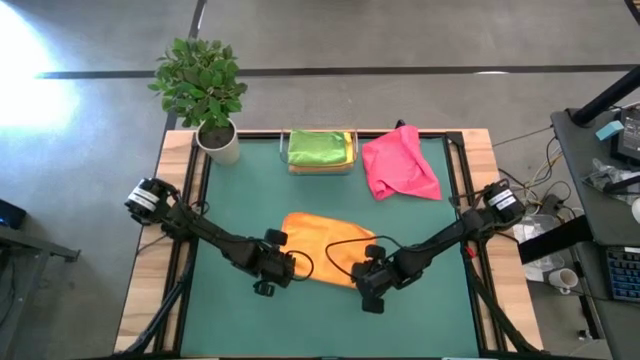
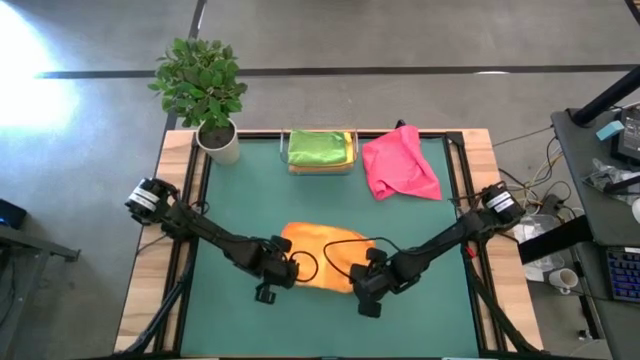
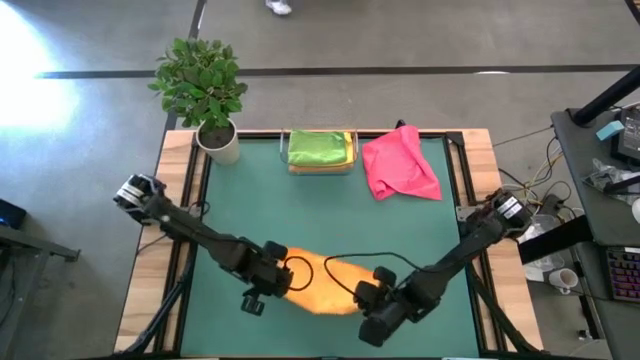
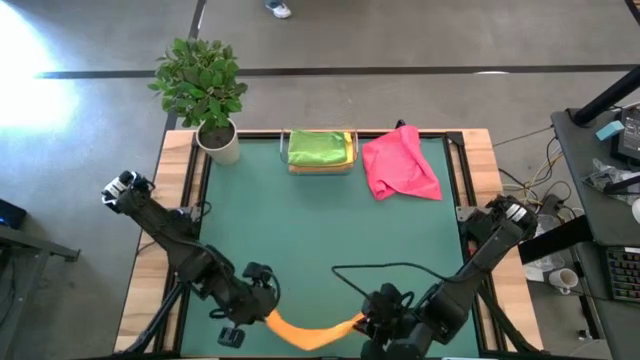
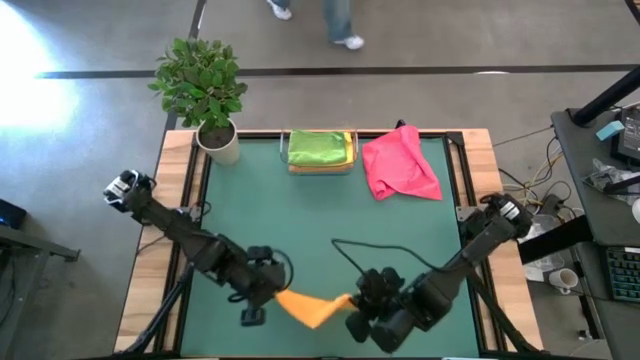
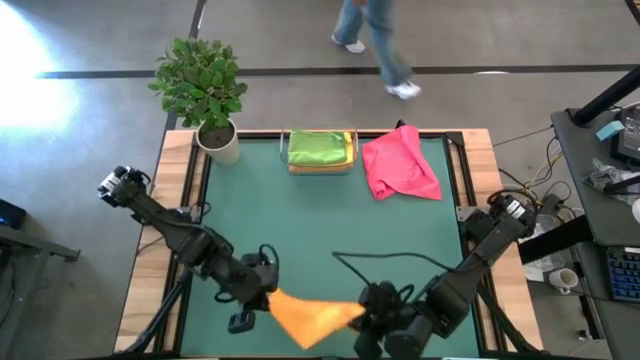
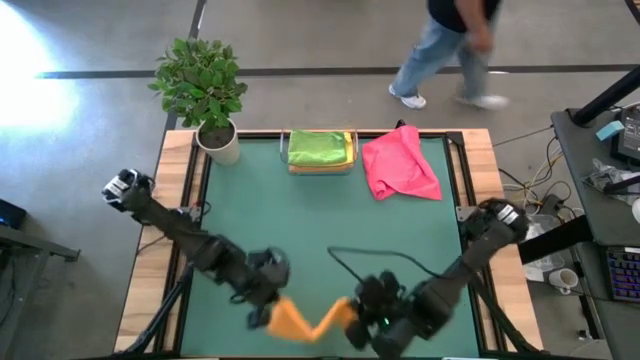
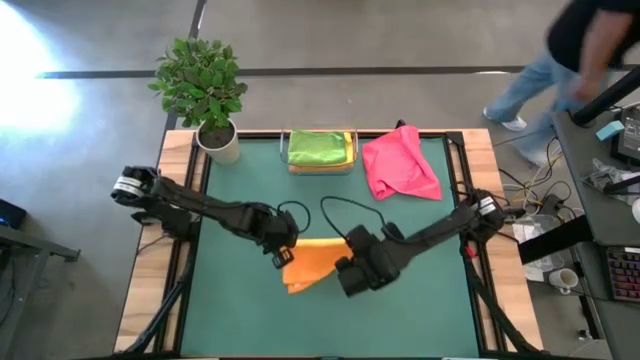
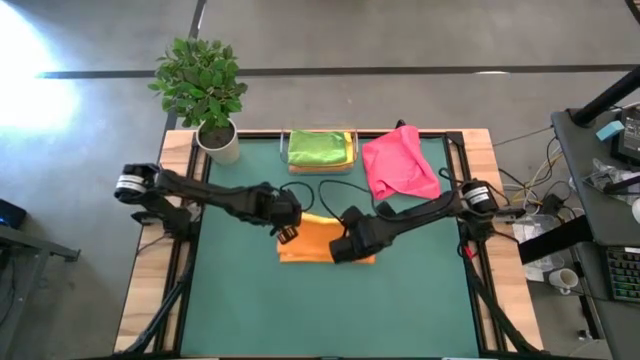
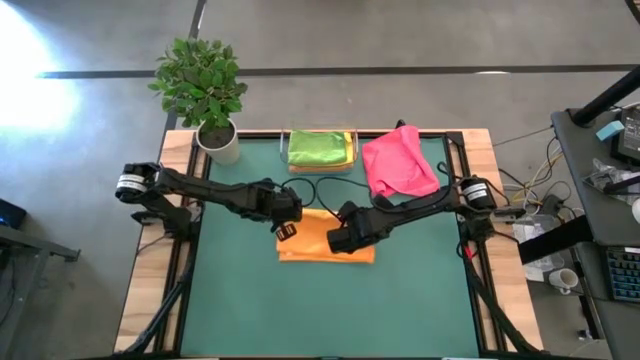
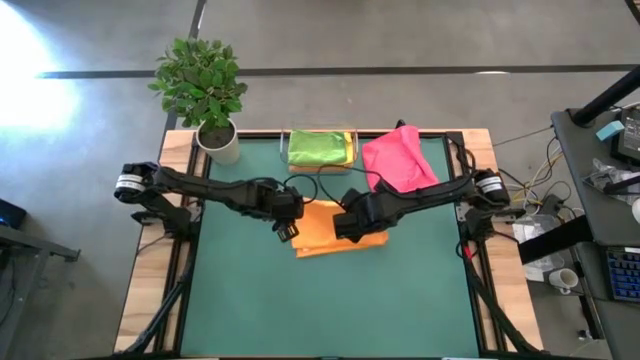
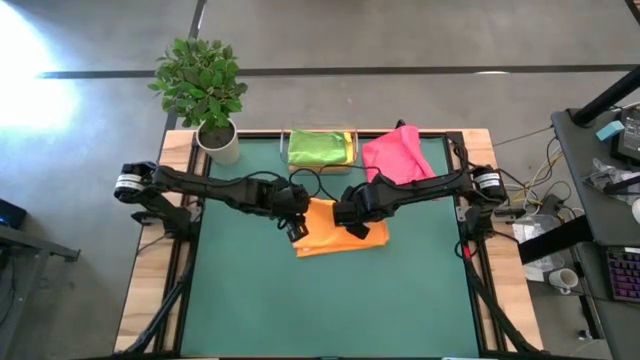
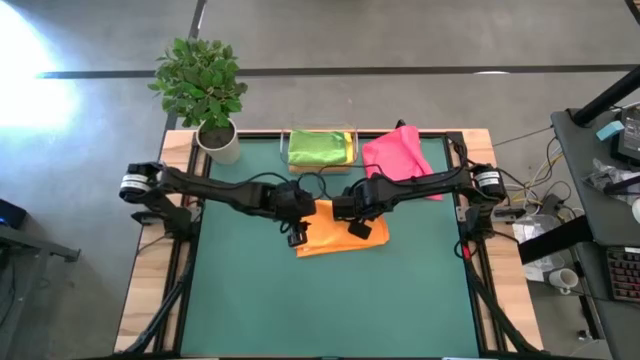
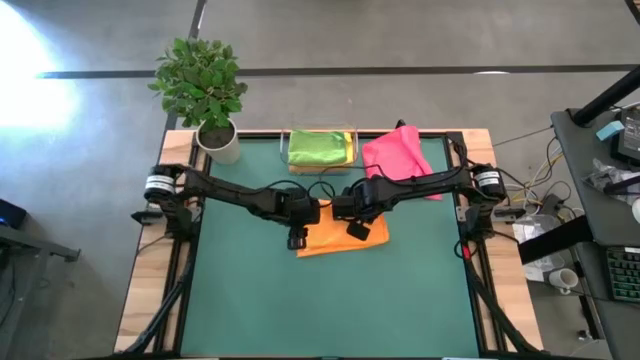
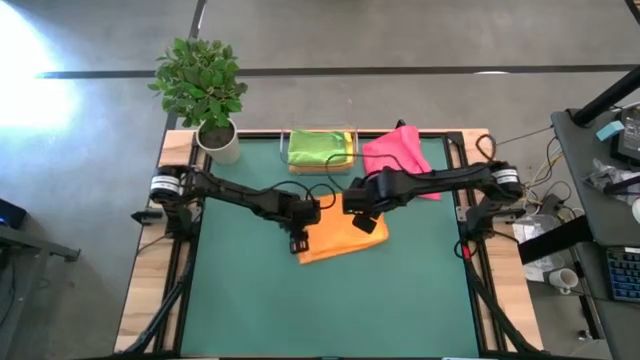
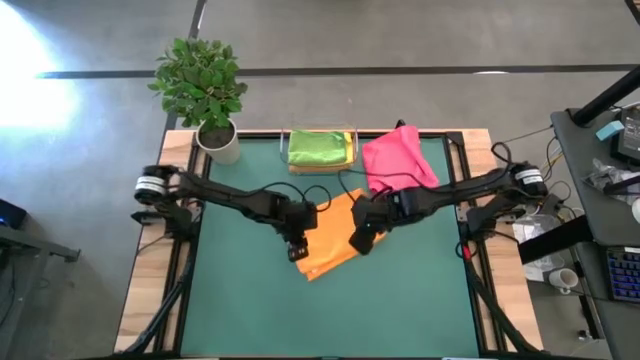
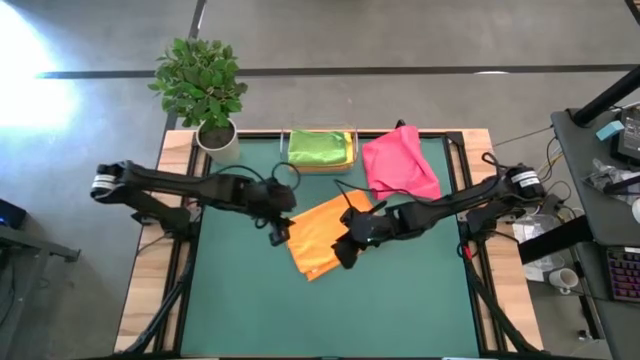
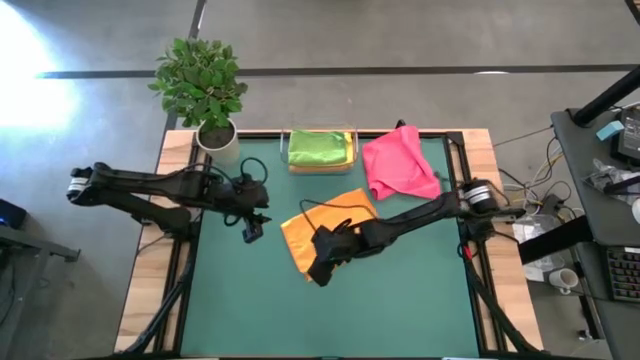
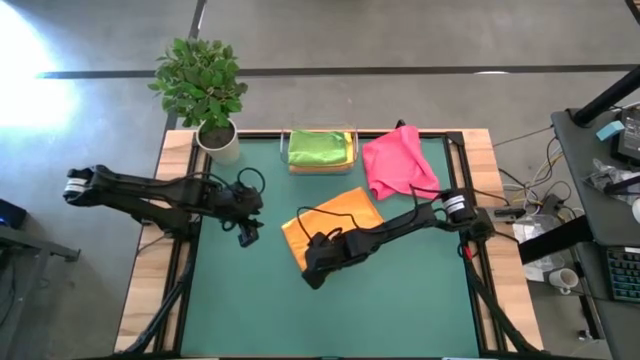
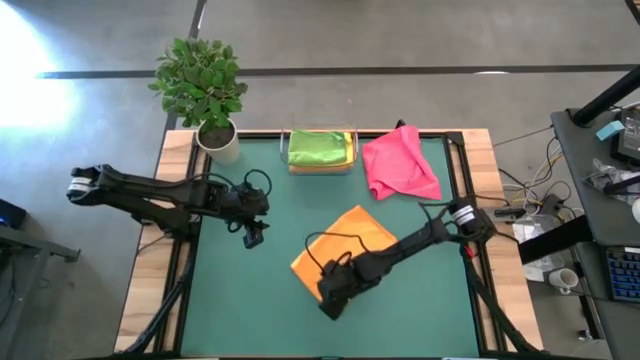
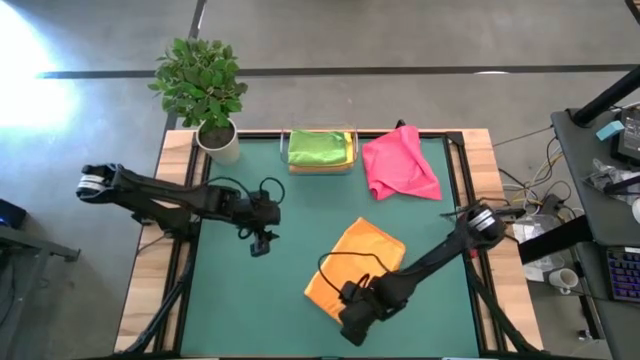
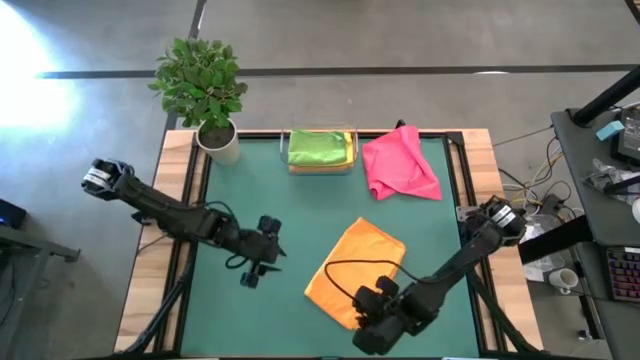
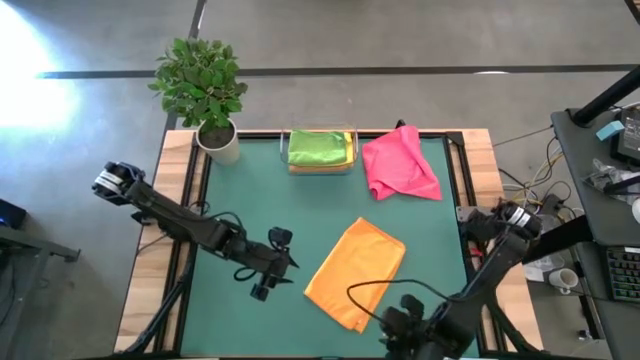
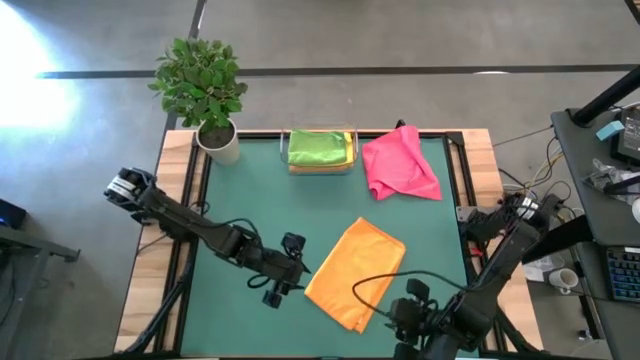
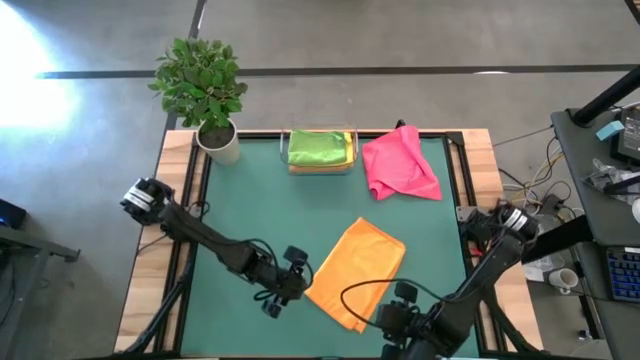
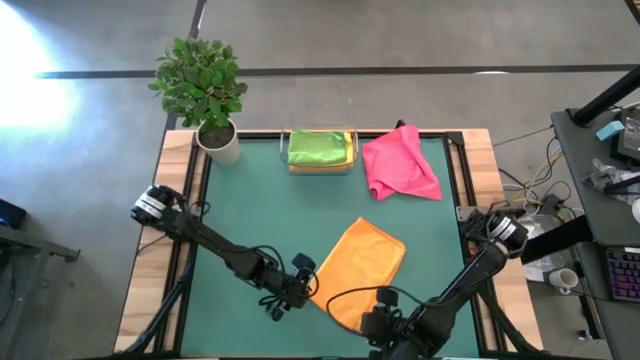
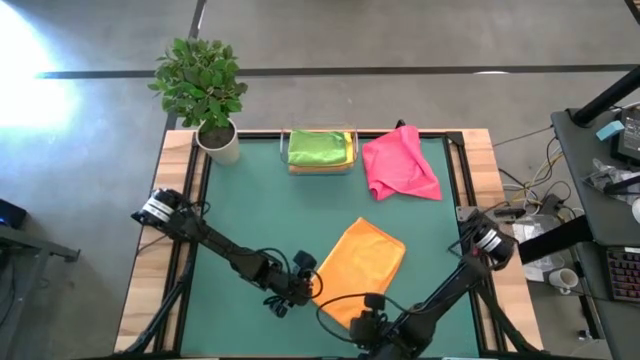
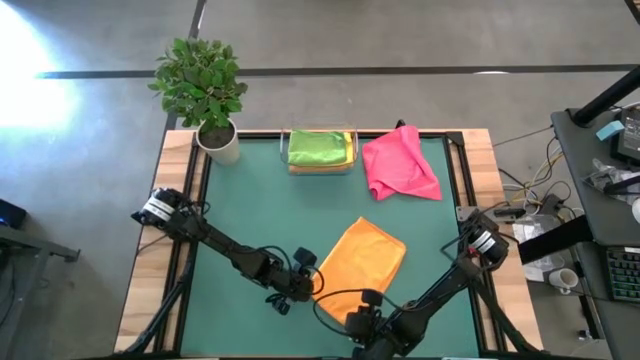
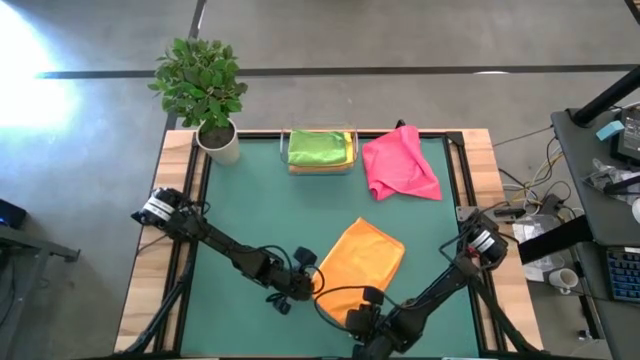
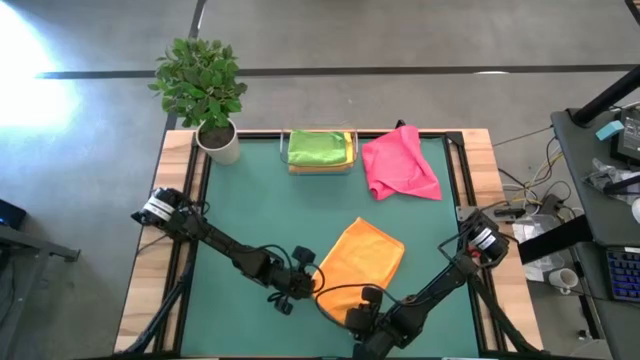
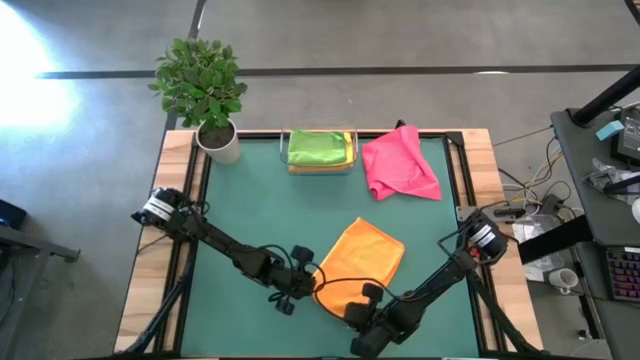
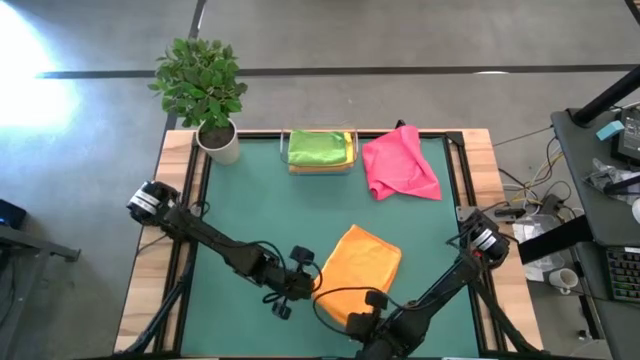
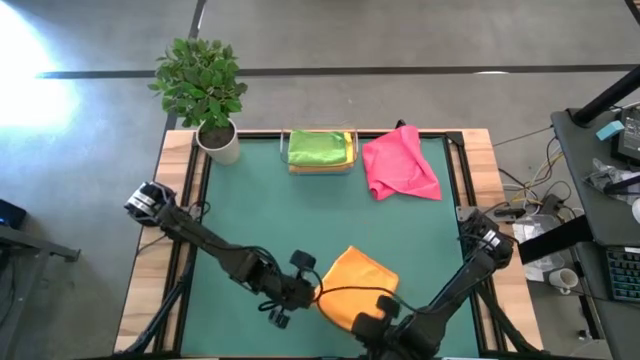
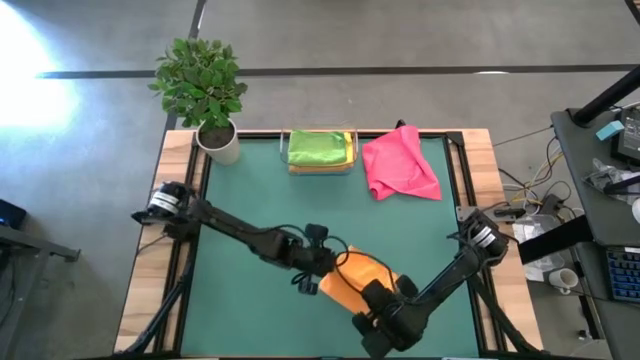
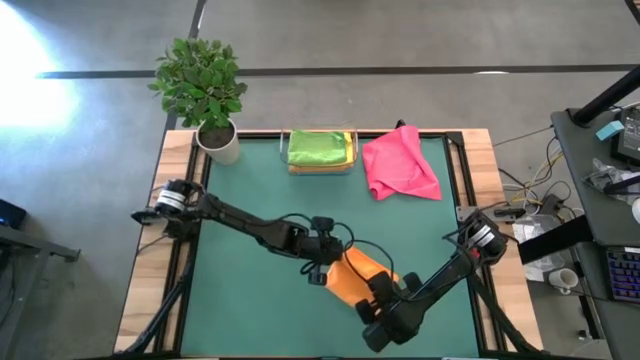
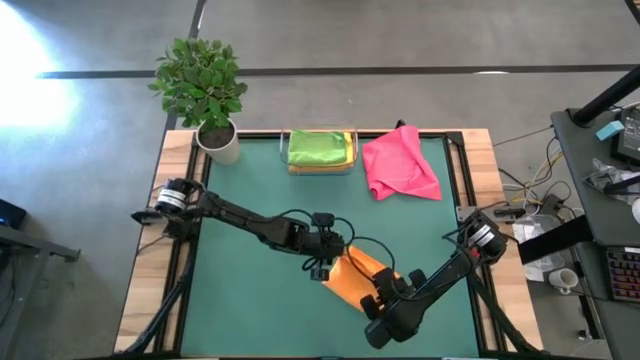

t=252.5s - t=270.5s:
Task: Fold microfiber towels
Fold the orange microfiber towel
